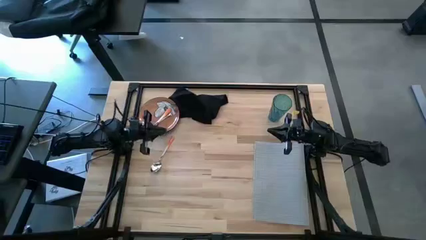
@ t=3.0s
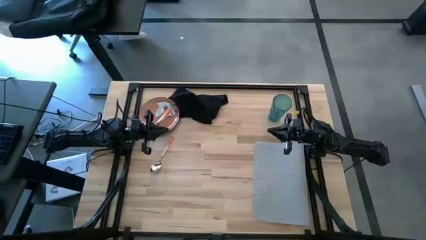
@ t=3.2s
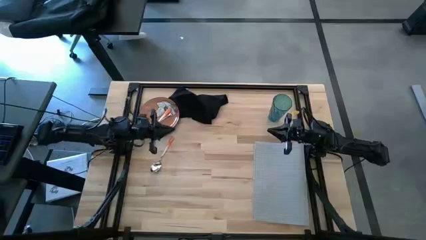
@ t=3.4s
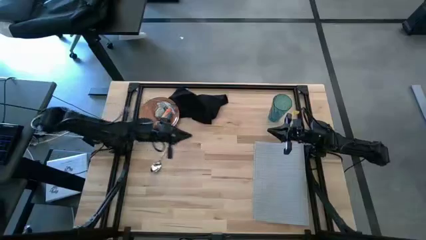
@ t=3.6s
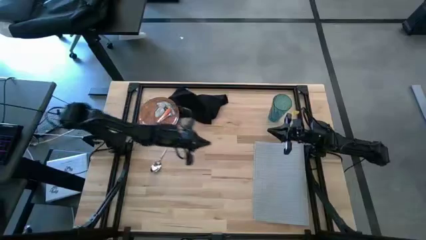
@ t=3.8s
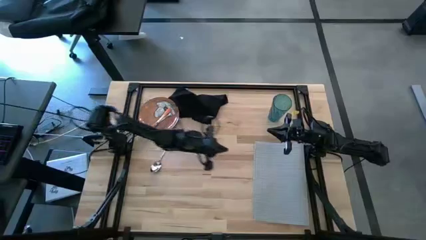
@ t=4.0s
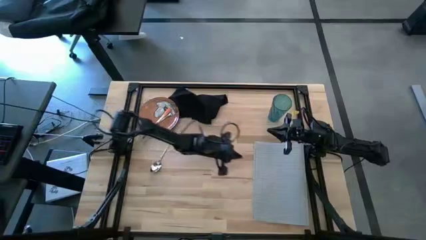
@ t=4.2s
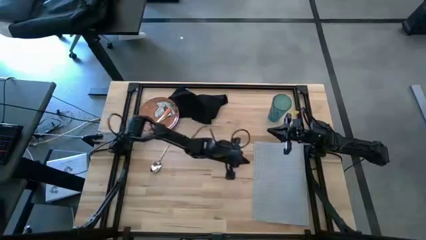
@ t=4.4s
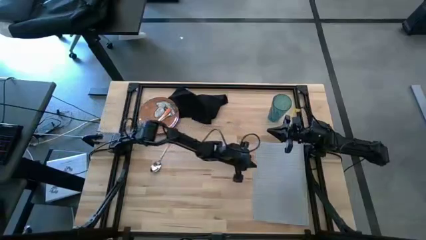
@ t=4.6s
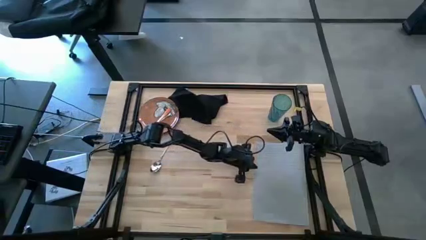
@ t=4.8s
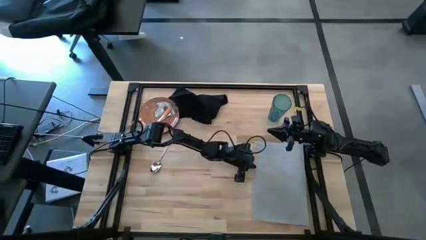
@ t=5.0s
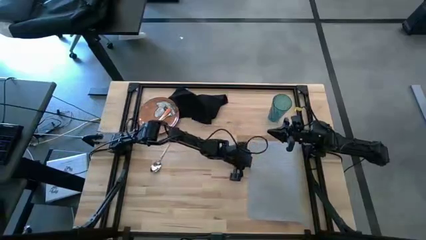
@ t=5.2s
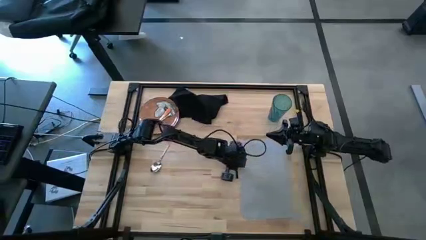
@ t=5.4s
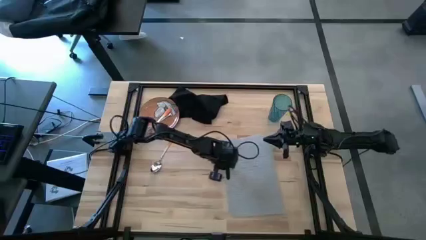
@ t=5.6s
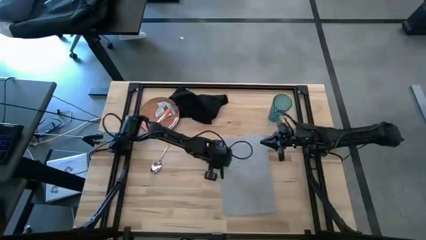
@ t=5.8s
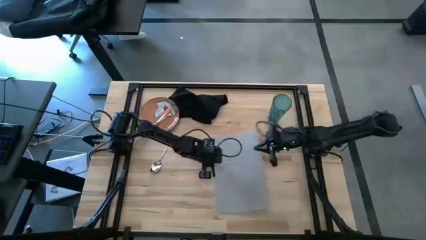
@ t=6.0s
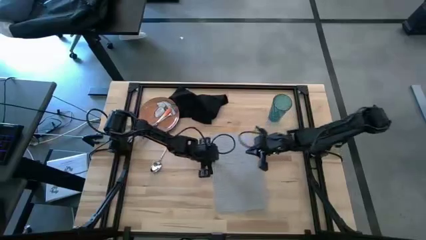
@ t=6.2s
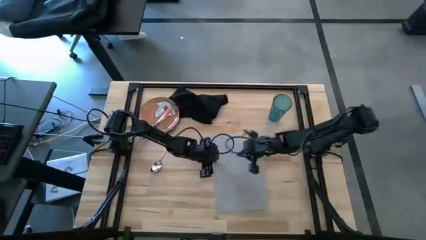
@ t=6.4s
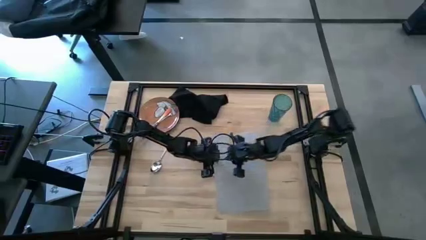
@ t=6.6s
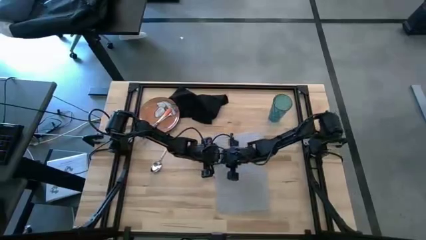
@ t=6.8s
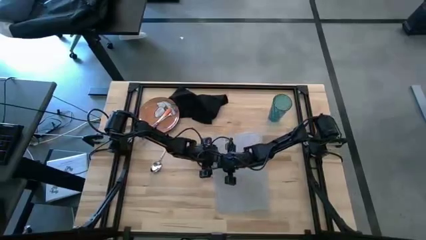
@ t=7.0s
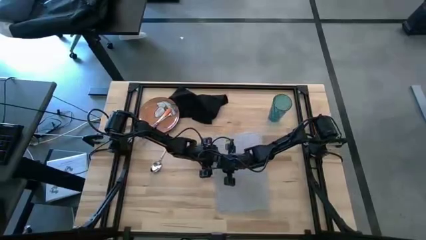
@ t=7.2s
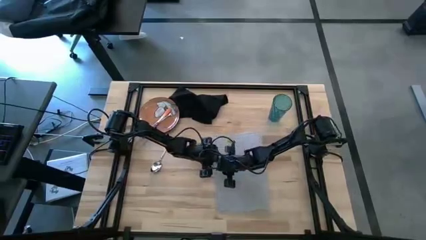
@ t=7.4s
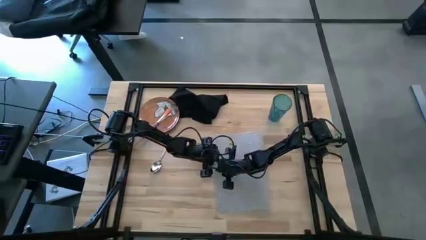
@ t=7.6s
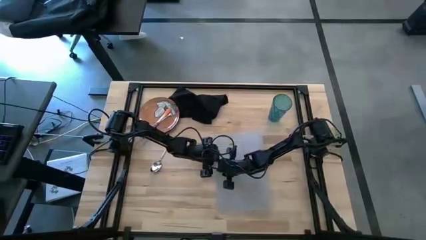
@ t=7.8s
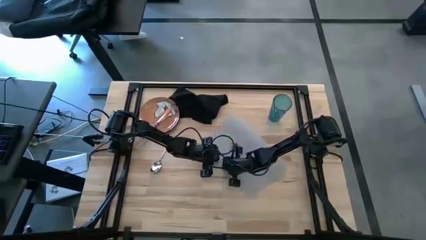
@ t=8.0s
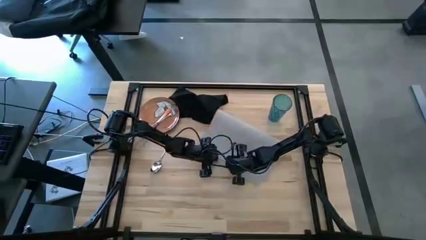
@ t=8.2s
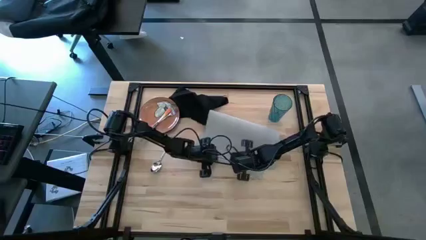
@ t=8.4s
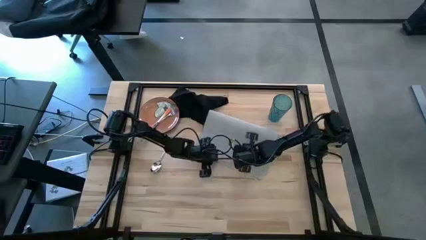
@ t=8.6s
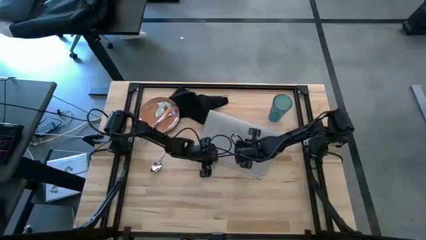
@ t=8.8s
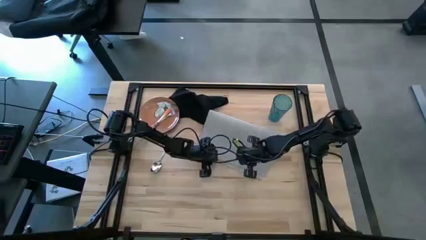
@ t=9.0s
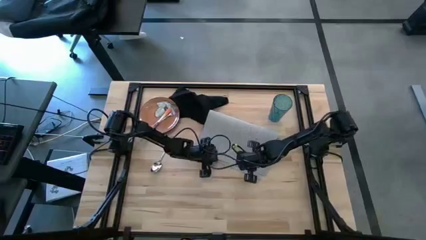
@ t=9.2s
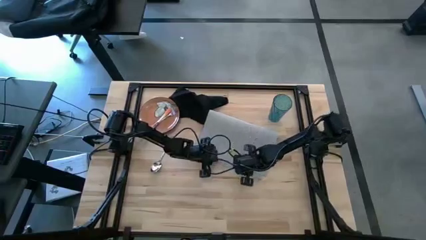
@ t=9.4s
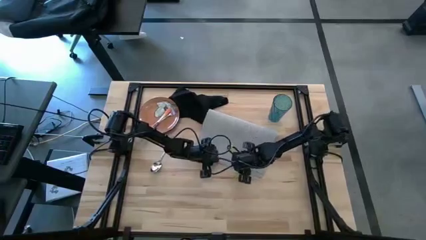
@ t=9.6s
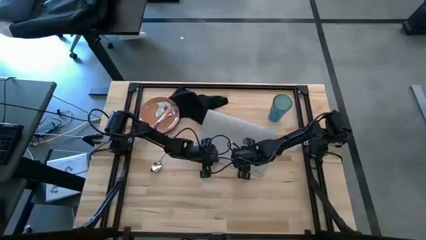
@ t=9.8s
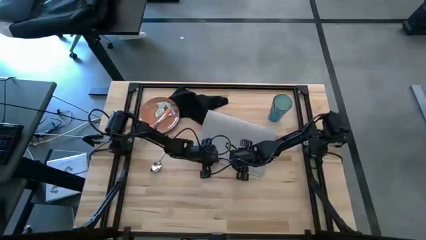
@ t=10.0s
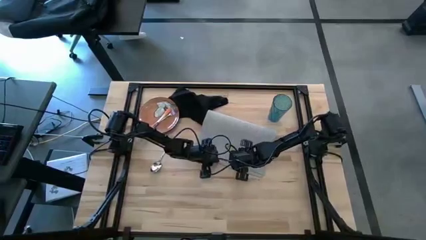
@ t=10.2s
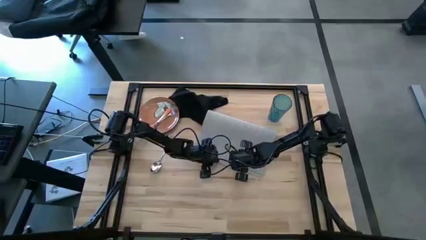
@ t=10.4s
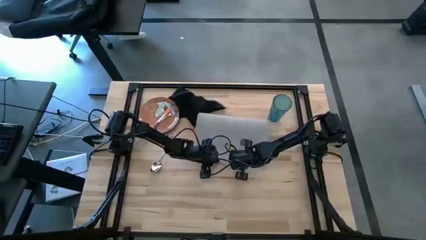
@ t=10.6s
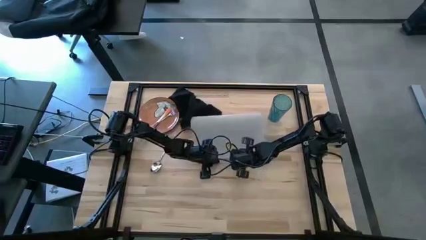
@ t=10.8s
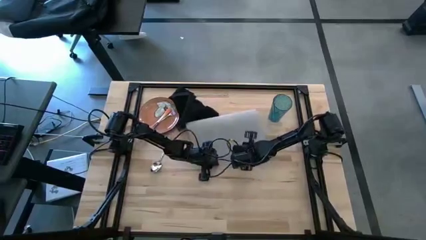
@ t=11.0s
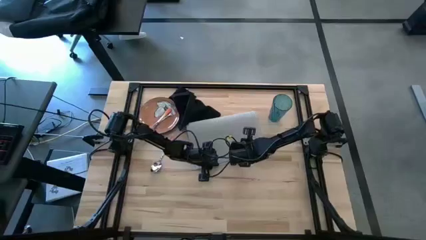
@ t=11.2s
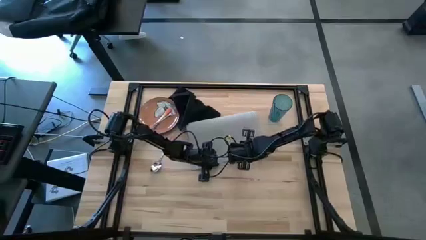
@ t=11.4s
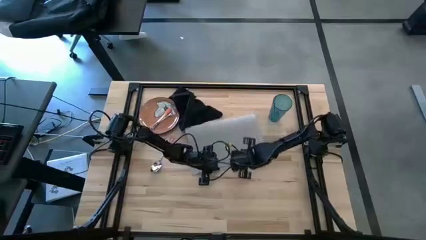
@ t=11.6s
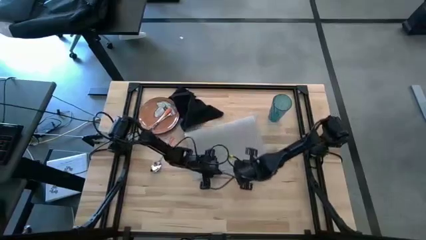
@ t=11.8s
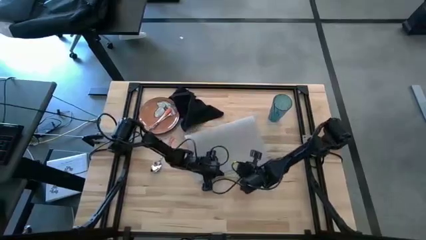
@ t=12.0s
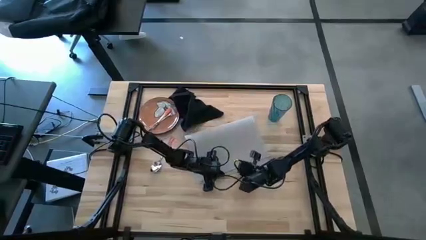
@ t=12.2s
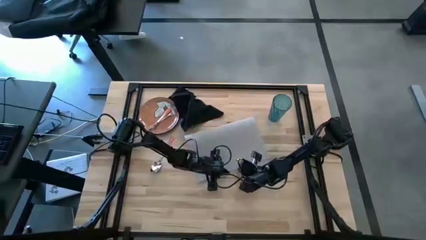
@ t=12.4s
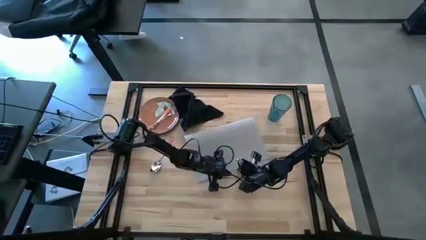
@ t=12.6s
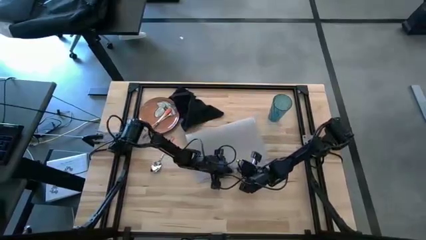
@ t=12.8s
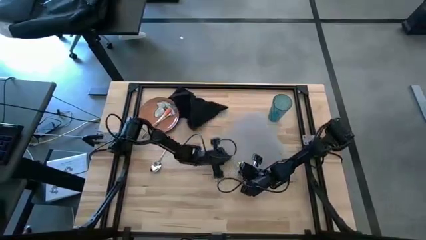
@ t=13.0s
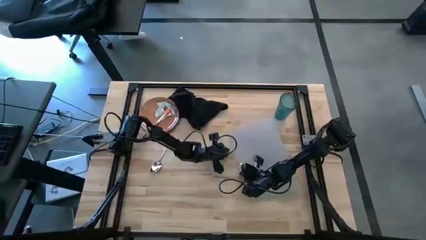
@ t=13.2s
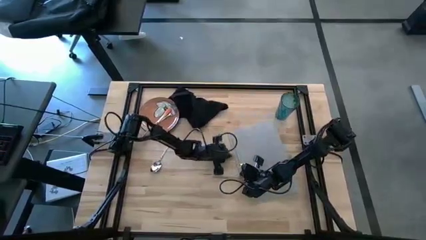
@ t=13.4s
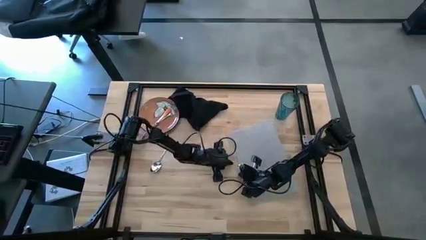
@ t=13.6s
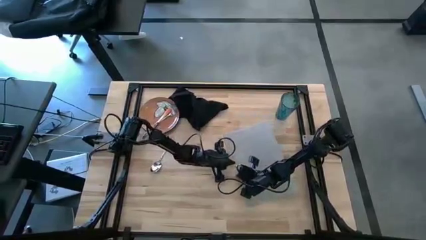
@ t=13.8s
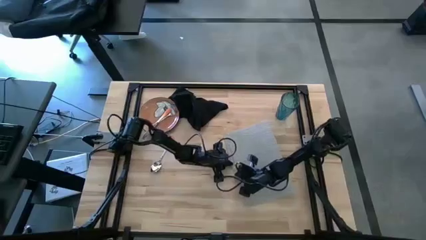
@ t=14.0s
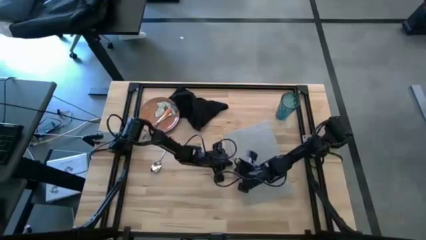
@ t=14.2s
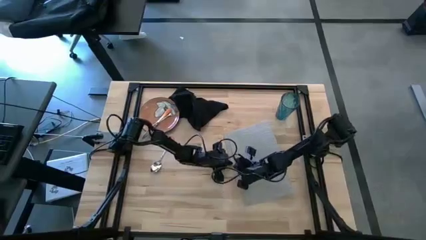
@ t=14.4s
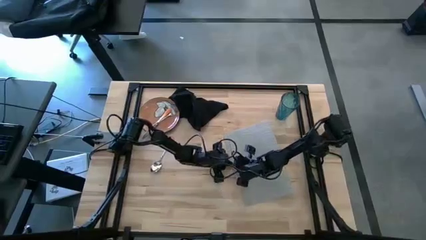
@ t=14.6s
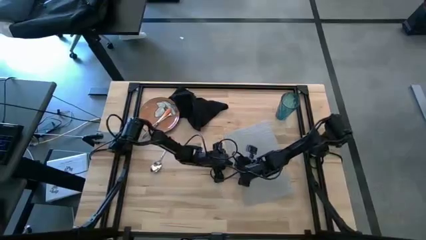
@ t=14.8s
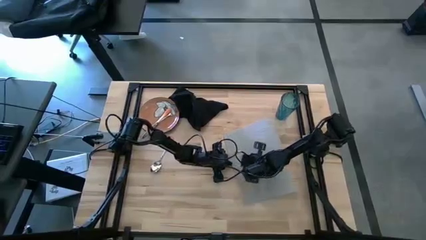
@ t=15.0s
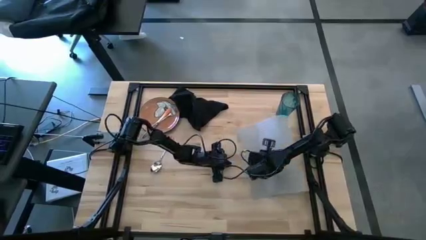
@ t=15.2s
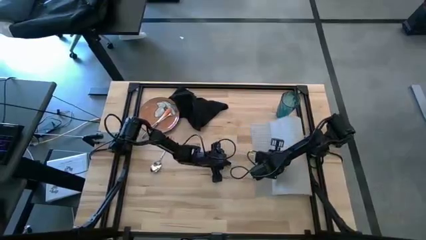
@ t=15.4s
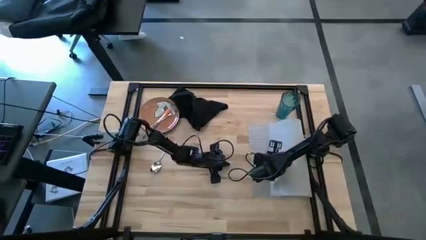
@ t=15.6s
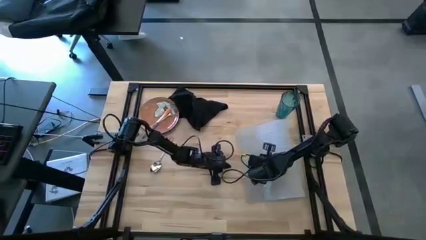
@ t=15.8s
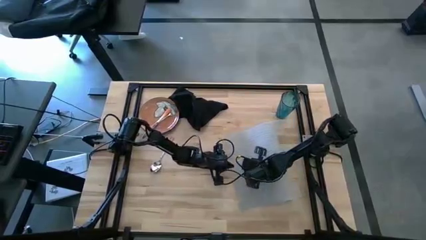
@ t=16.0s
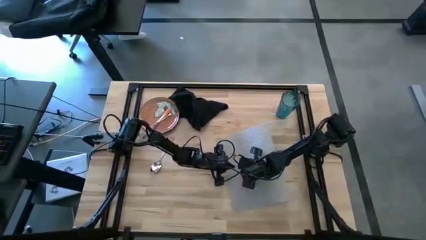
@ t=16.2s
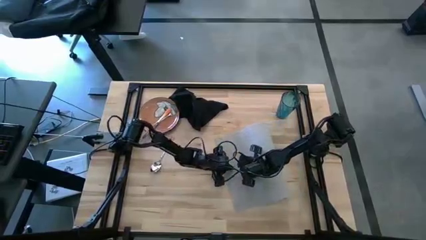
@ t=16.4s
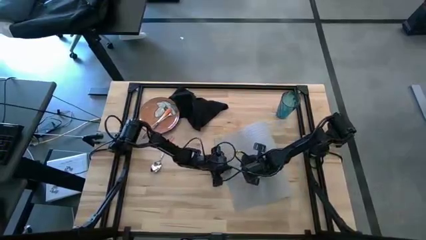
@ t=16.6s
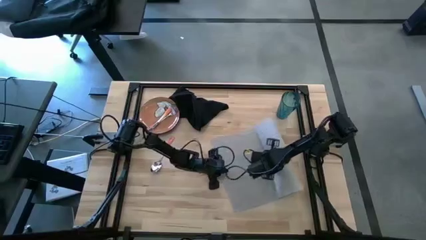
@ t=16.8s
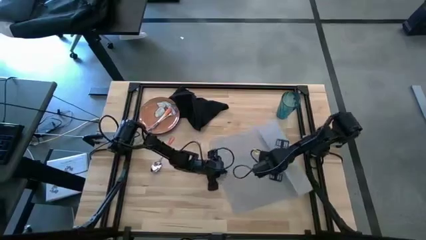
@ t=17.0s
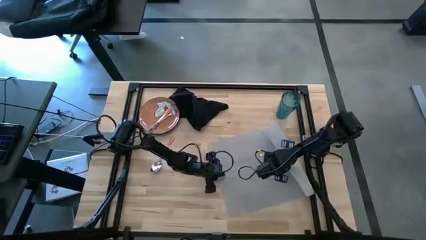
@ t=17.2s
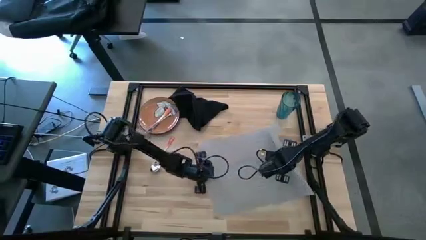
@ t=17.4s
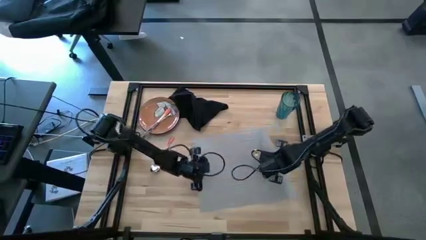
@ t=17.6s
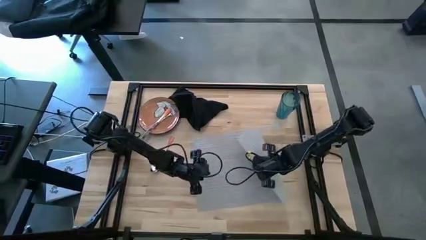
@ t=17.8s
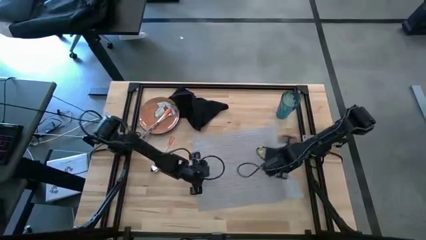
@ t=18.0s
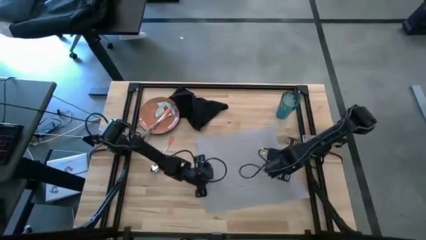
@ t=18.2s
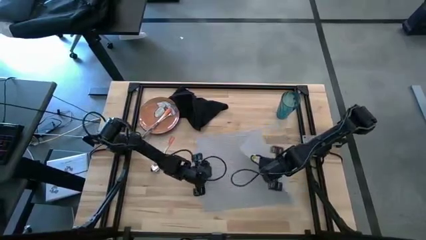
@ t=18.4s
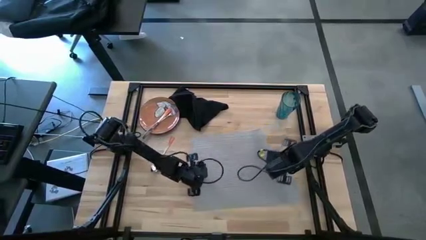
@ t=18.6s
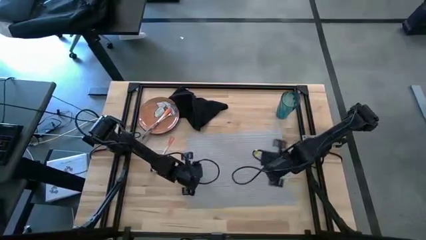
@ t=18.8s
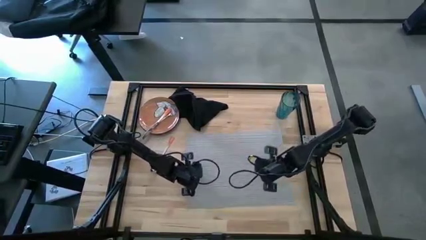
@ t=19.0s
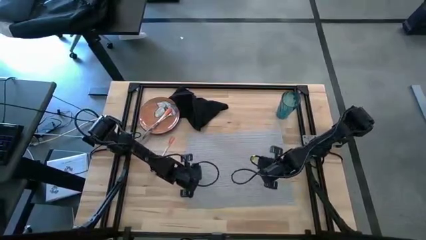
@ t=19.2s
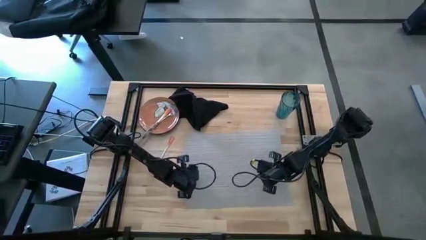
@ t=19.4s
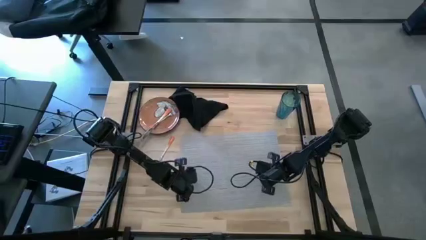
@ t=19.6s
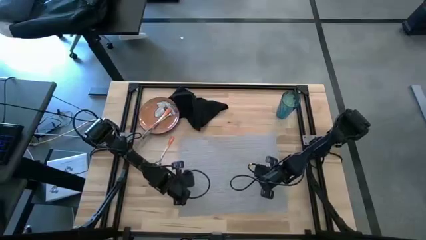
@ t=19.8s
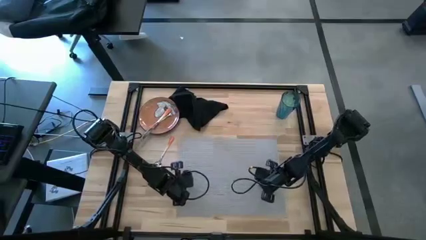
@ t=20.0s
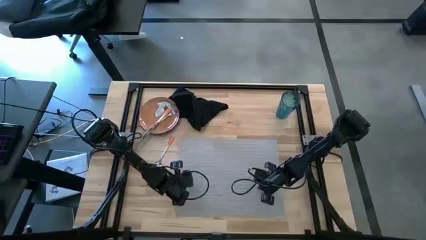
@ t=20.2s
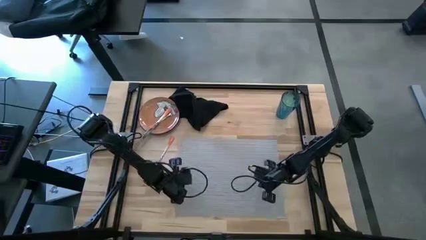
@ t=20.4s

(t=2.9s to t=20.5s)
Task: Set table place
Prepare the gray placemat
